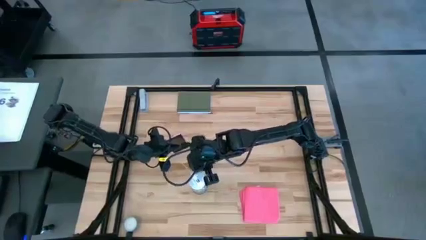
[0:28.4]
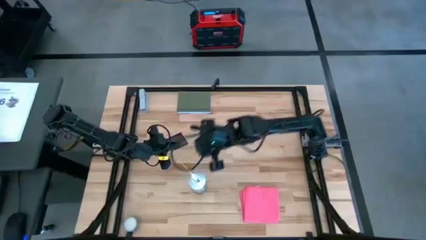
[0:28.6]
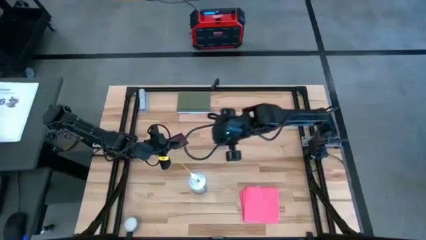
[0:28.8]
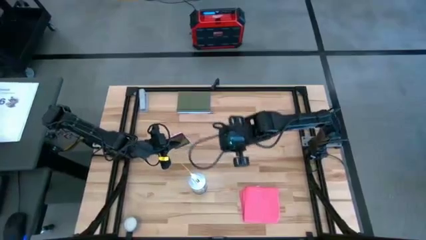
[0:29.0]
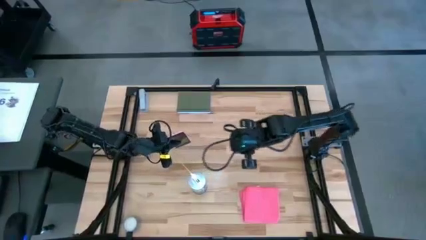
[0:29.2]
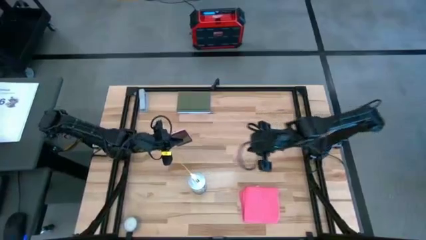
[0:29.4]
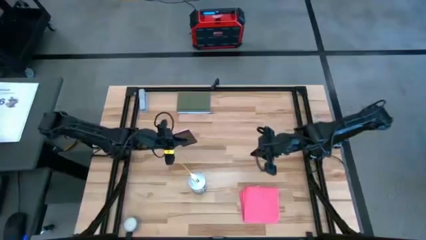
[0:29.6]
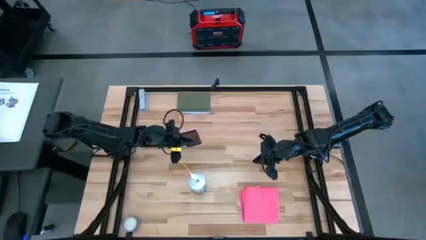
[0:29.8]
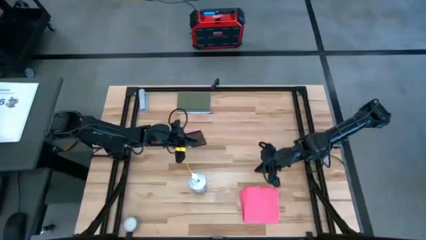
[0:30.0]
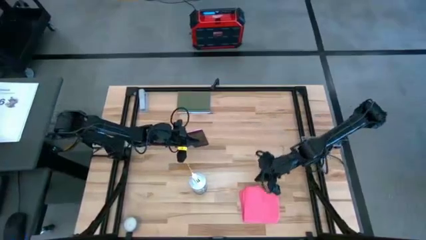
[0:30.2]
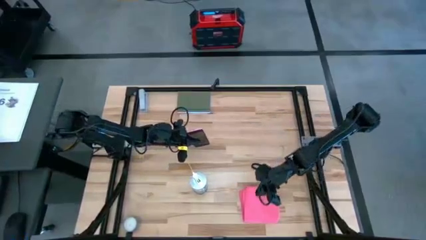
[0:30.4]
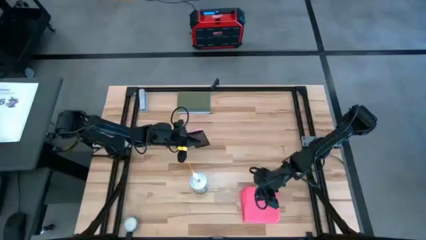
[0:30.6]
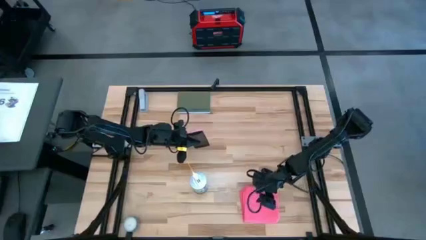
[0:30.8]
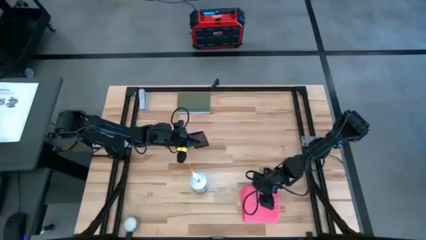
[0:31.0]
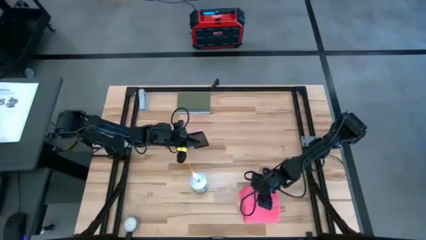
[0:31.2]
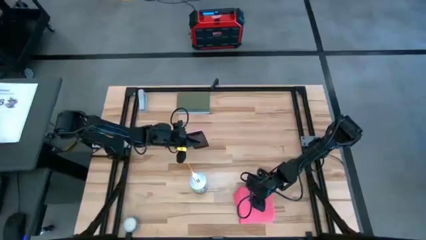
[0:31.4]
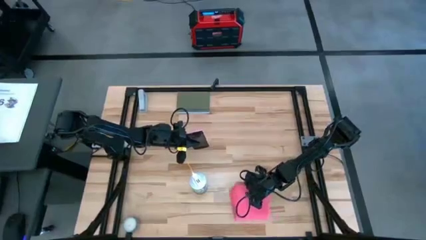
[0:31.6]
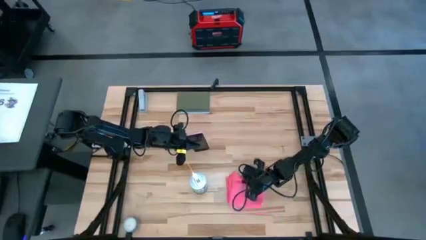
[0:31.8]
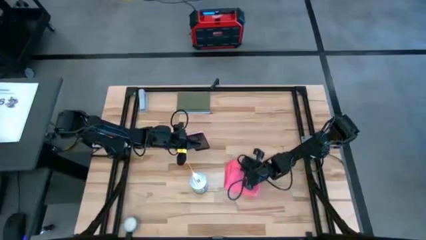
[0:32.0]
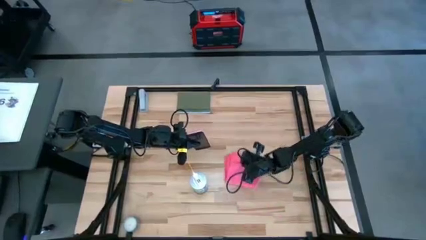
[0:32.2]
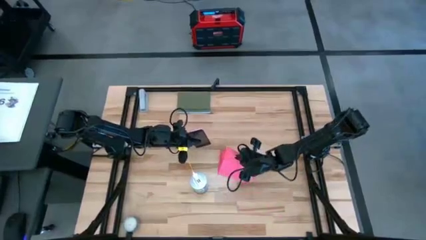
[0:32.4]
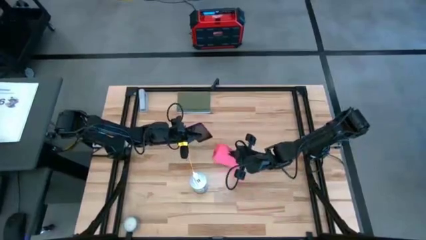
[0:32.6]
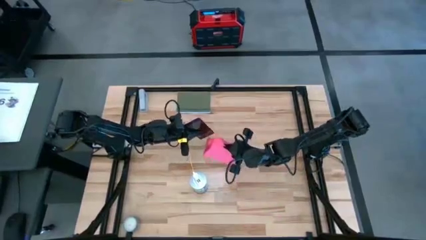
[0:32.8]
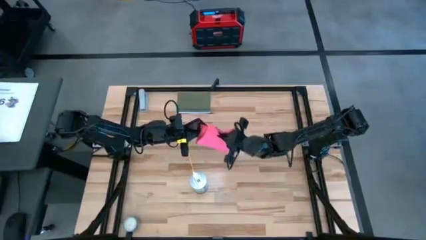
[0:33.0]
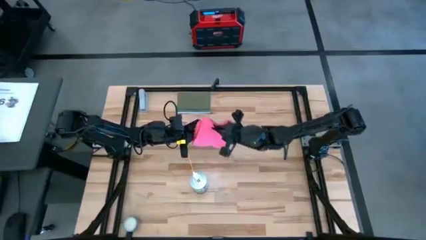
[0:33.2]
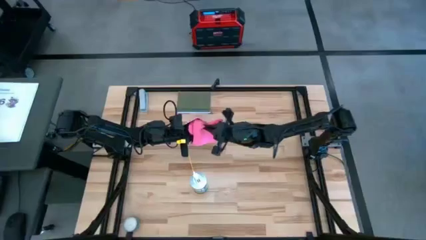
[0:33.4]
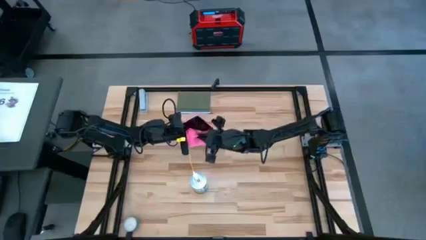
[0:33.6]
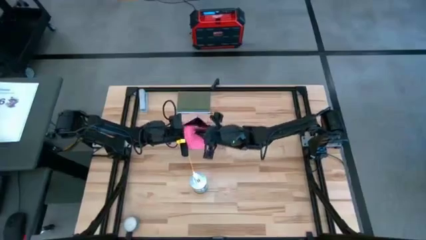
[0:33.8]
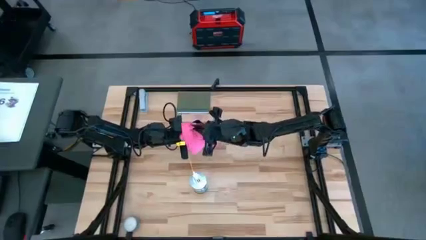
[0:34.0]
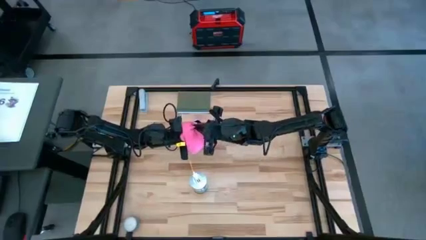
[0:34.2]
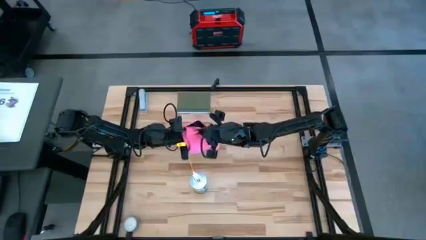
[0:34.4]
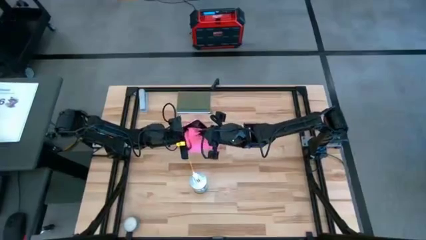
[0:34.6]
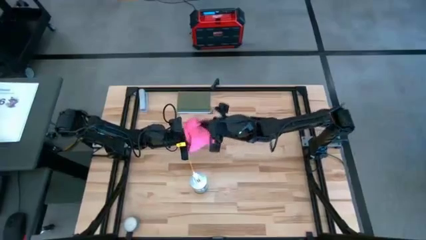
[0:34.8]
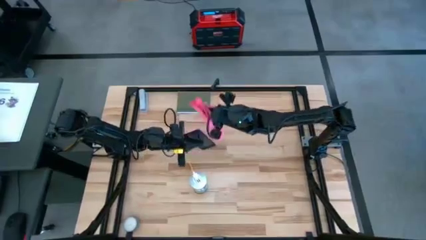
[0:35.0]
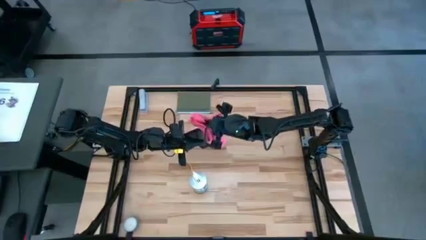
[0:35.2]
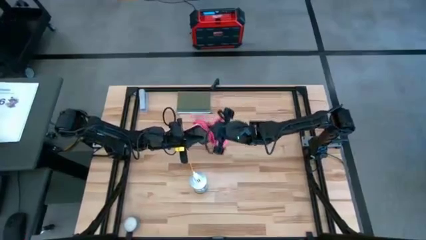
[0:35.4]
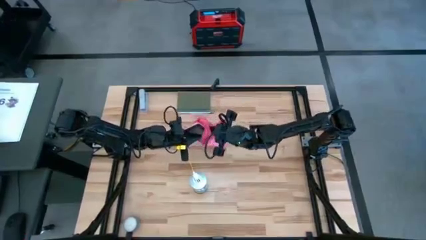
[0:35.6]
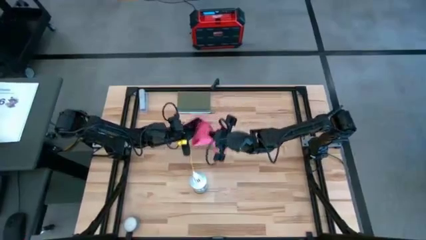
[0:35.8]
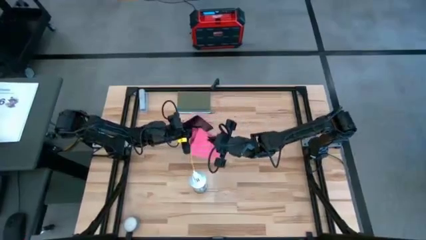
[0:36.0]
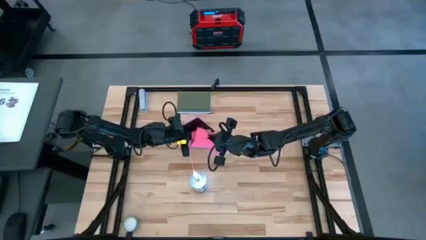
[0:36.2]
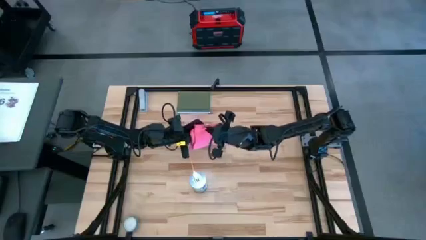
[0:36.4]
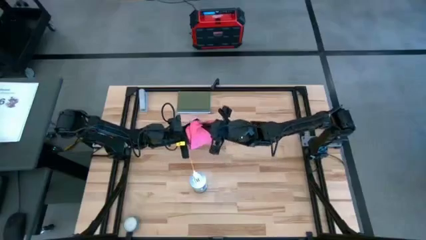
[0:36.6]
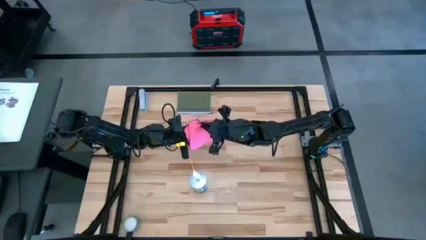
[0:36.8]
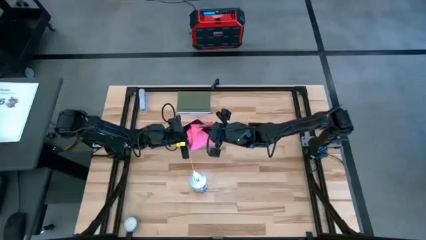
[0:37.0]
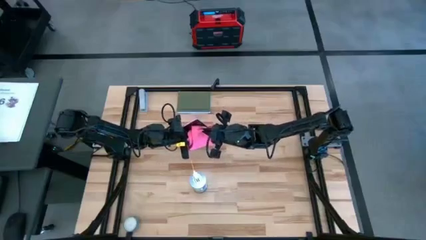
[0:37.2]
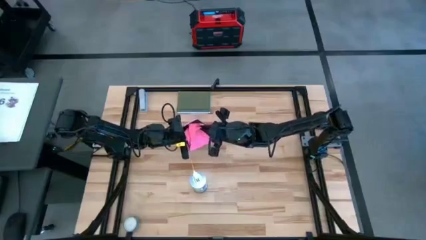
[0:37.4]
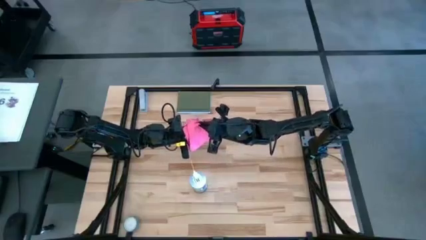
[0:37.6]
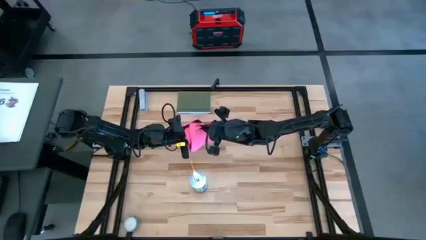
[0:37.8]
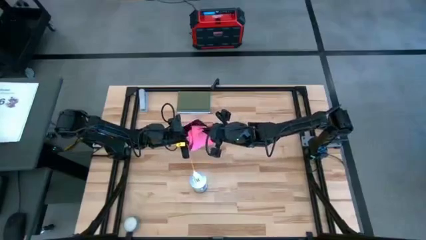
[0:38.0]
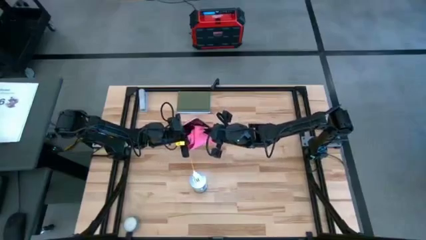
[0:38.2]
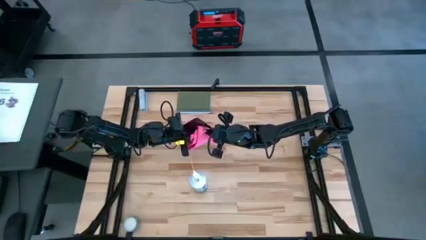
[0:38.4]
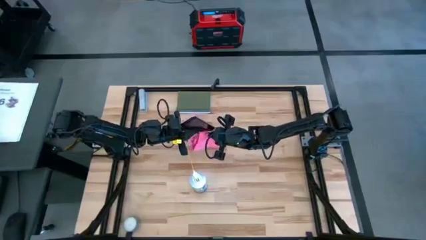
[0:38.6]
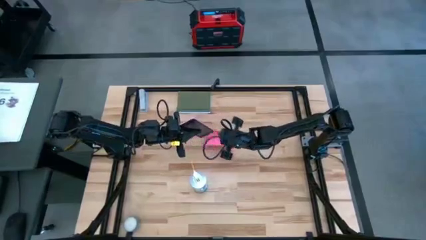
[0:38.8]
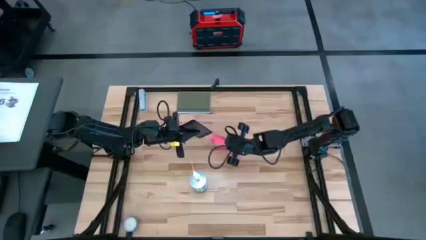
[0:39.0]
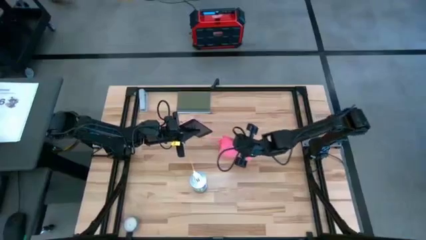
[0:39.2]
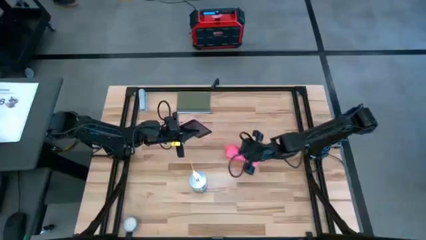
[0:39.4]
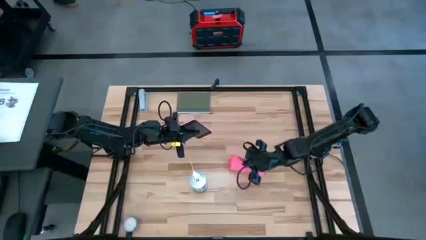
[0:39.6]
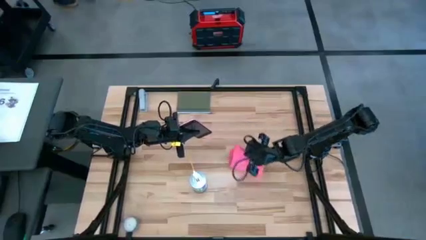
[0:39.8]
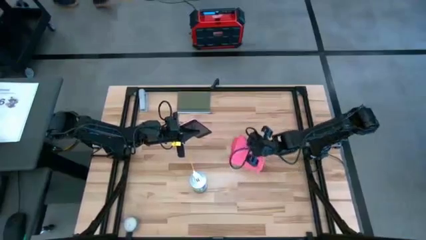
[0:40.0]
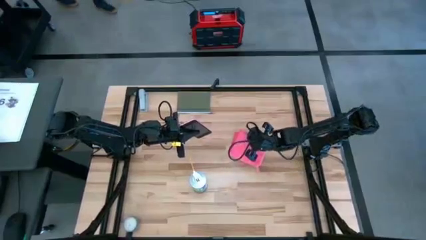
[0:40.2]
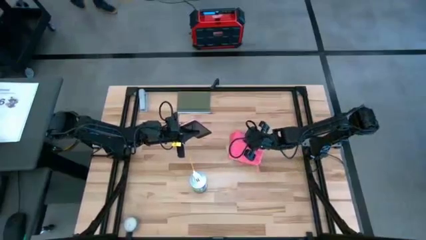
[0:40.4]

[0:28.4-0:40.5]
Task: Apply microfiber cloth
Wipe the front of the pink cellphone with the pink microfiber towel

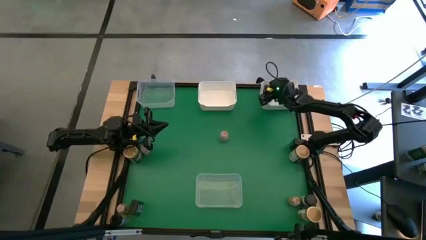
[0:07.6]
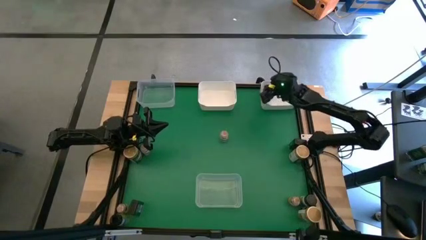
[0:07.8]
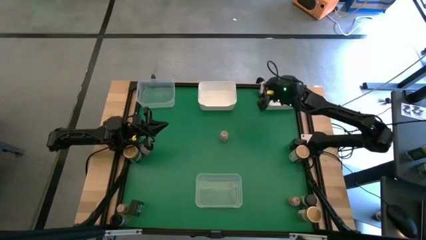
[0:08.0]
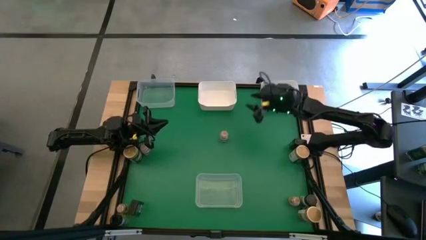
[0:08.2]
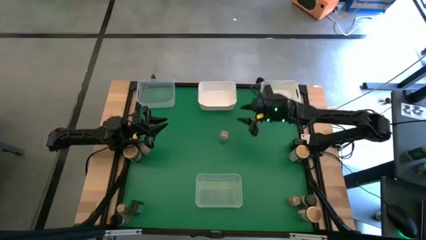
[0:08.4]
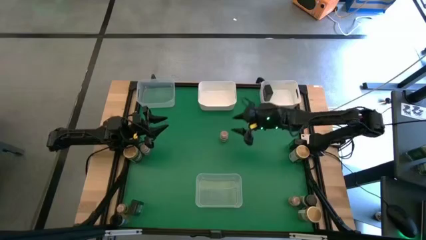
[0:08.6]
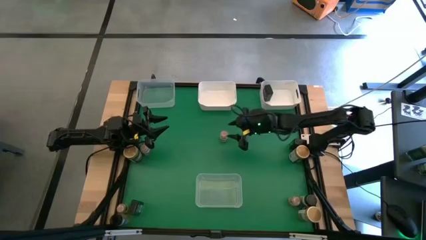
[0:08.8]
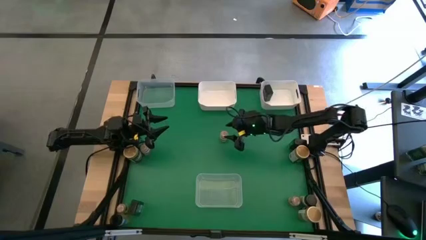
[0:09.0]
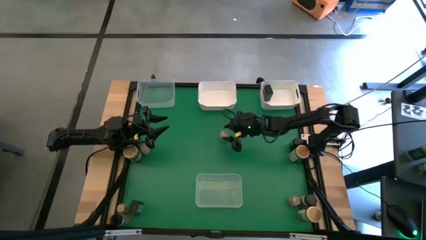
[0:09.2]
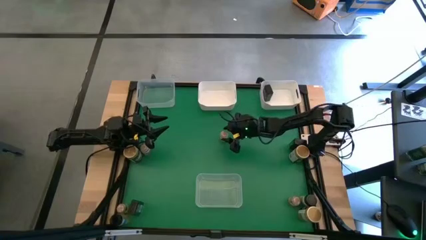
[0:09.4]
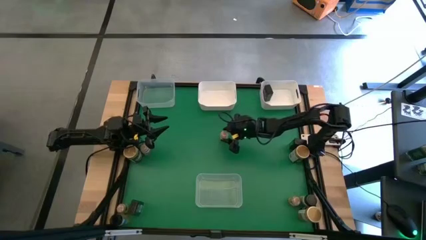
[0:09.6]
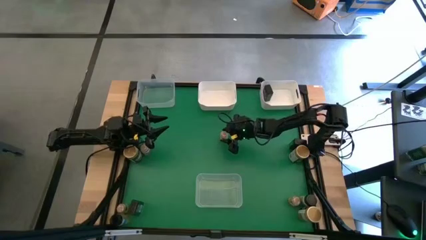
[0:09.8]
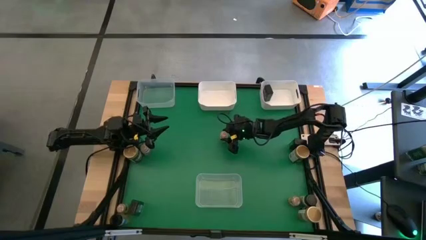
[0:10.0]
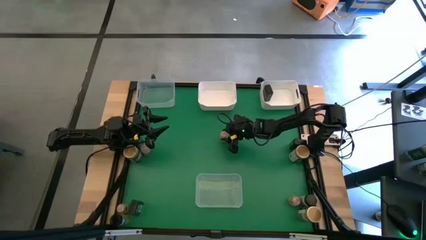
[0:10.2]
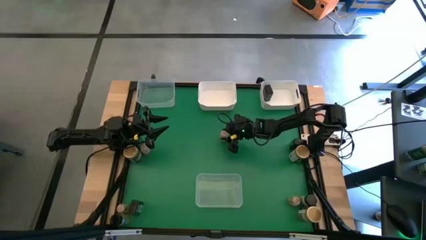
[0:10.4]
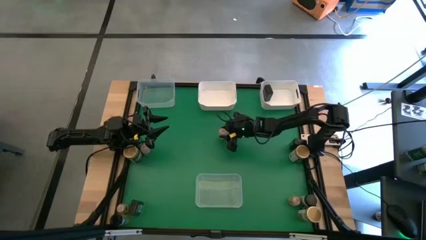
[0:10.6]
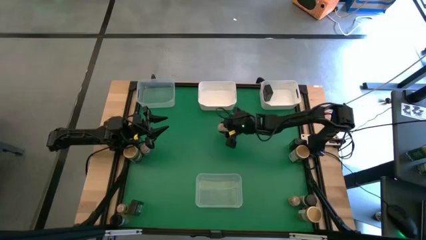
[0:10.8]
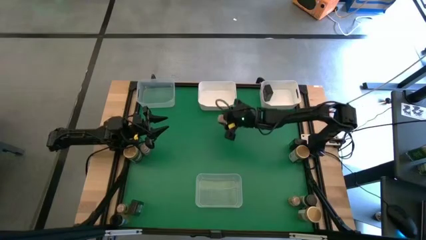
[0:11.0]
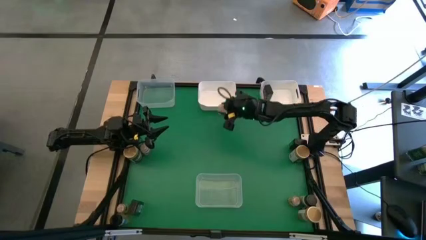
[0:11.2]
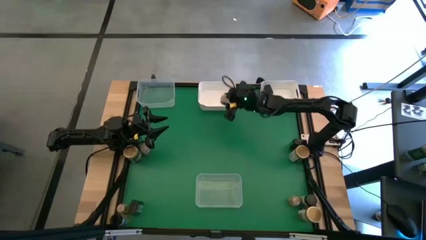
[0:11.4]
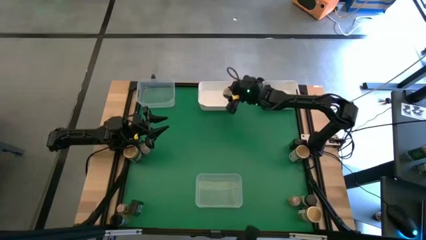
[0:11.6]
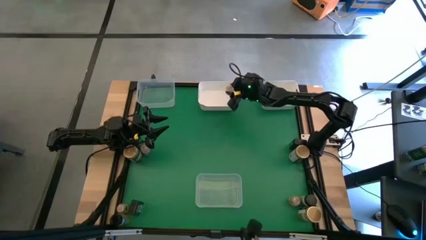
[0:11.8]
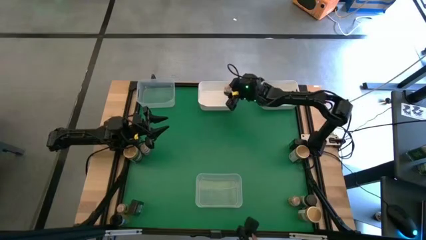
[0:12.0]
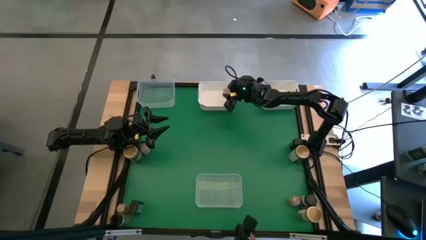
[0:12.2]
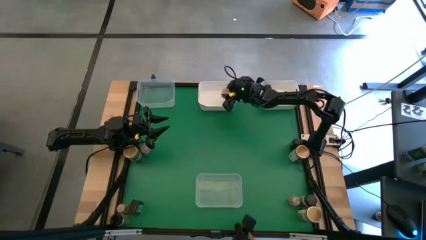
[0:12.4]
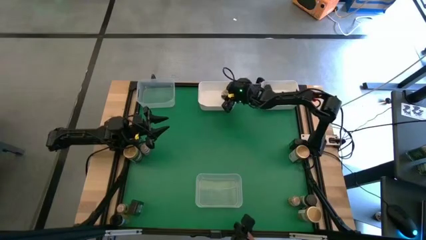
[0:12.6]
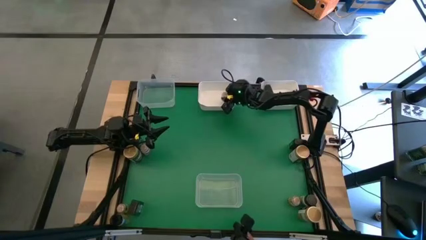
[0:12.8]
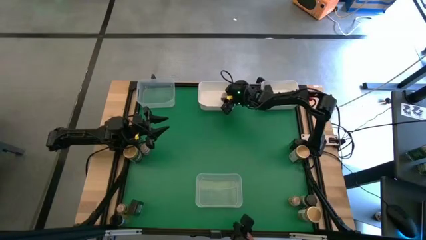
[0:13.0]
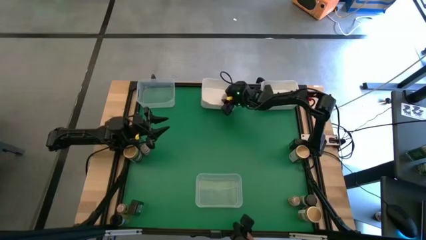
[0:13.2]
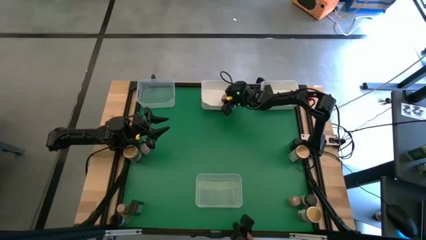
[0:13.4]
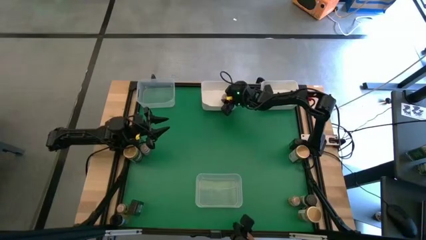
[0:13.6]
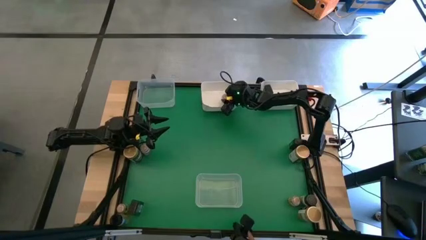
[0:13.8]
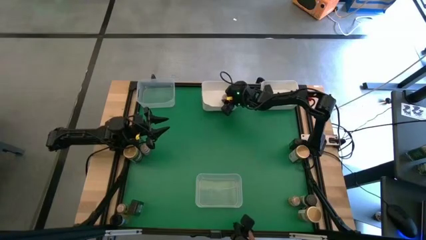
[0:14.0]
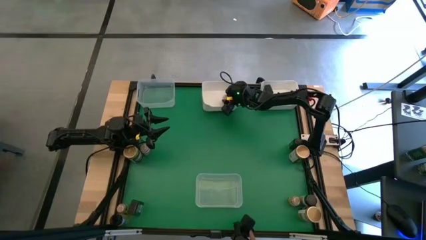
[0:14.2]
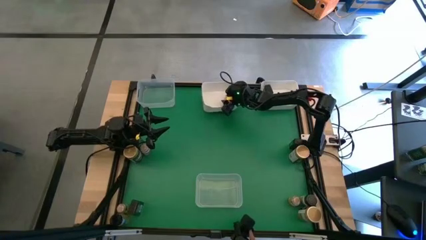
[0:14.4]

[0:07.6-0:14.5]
Task: Sort spices by type
Put the brown seasoning bottle into the left white bin
